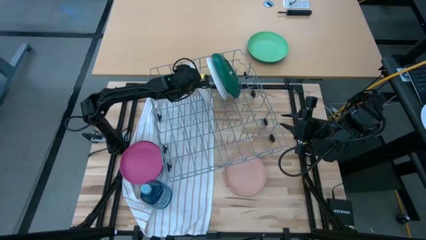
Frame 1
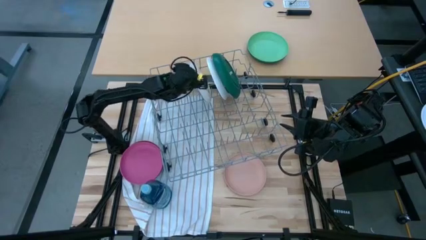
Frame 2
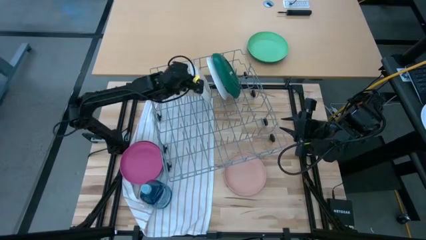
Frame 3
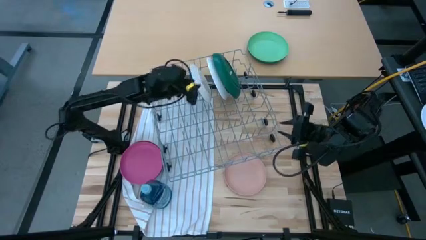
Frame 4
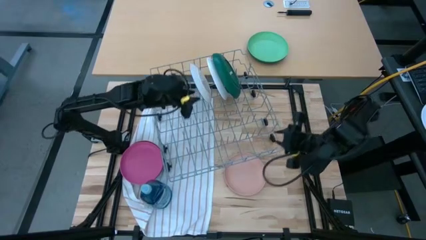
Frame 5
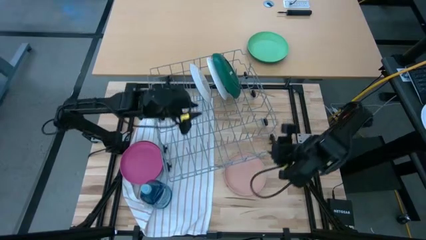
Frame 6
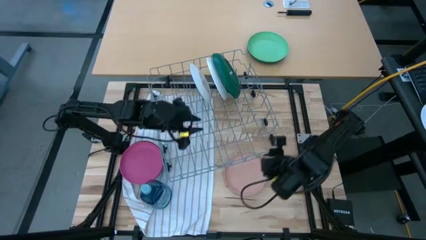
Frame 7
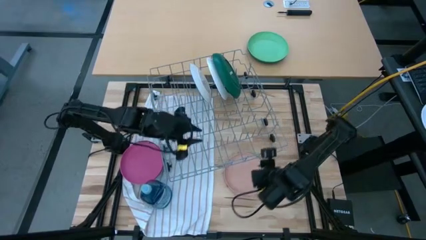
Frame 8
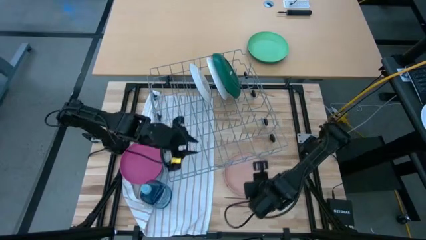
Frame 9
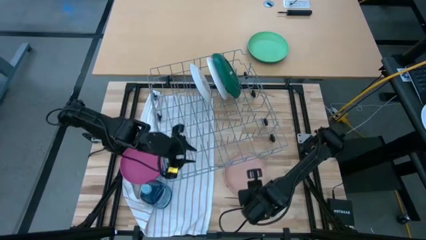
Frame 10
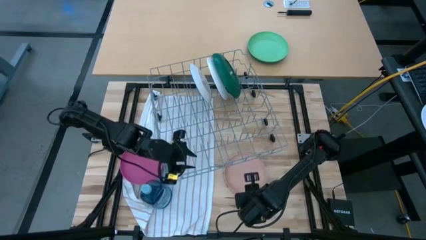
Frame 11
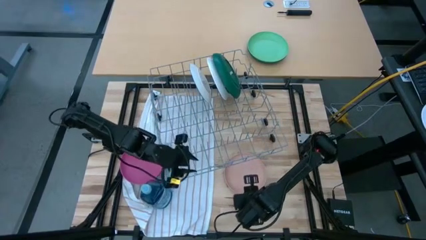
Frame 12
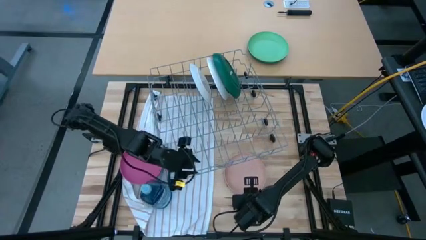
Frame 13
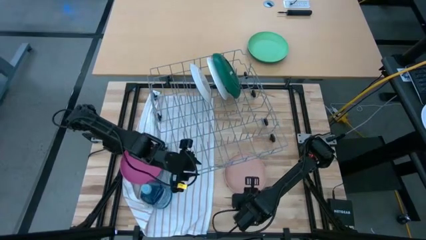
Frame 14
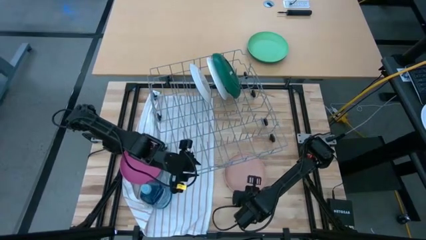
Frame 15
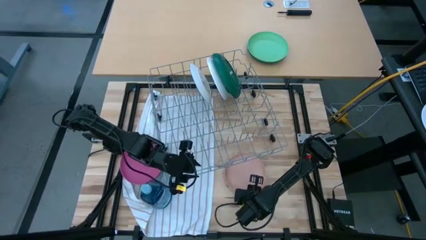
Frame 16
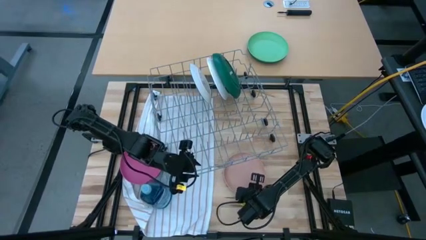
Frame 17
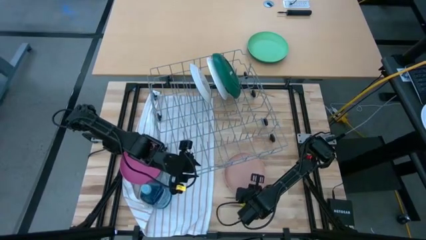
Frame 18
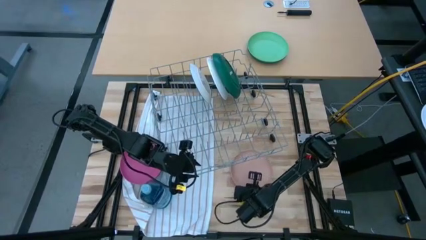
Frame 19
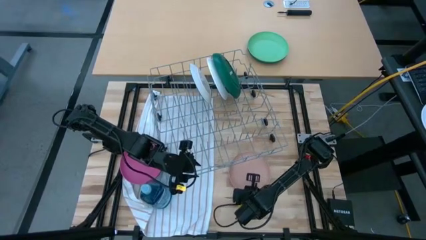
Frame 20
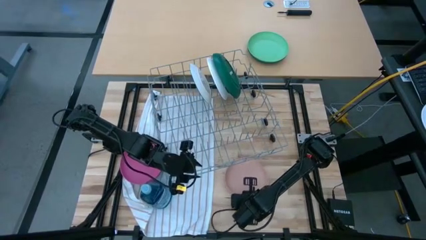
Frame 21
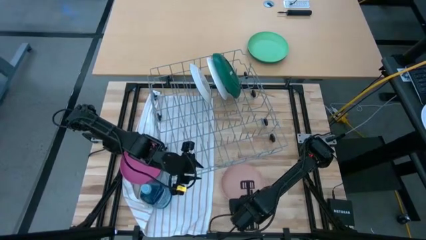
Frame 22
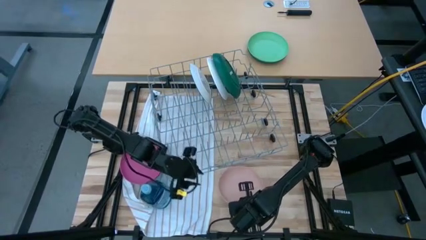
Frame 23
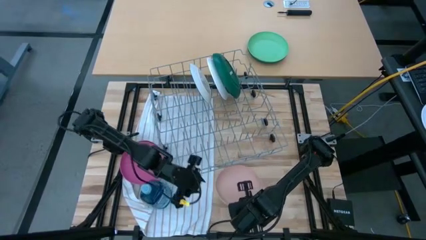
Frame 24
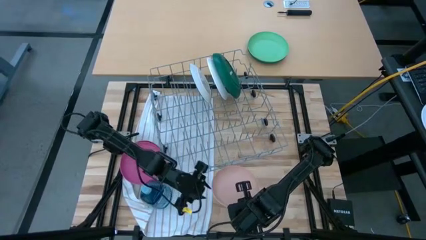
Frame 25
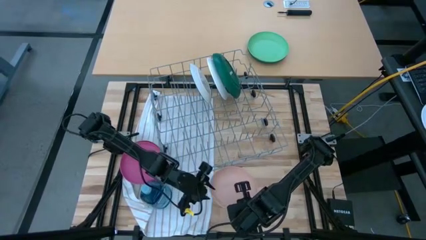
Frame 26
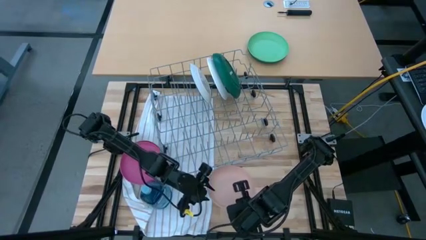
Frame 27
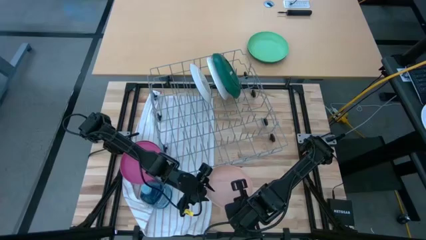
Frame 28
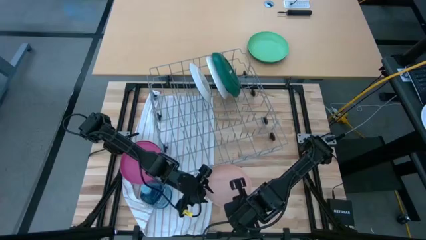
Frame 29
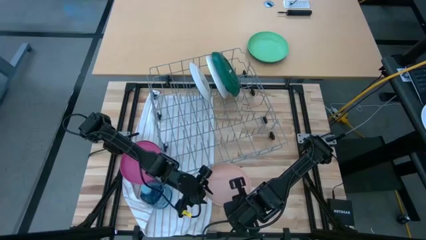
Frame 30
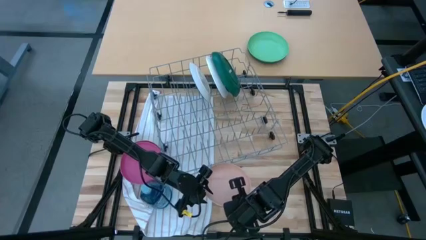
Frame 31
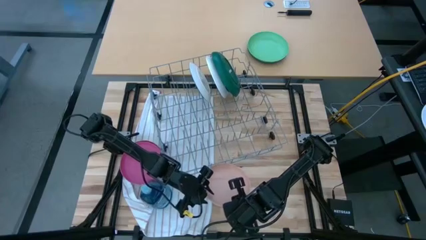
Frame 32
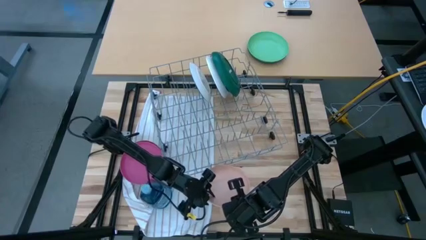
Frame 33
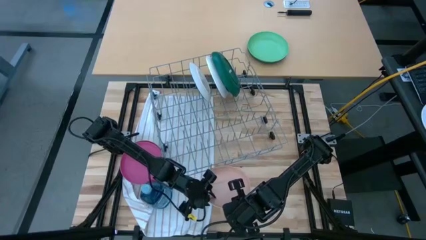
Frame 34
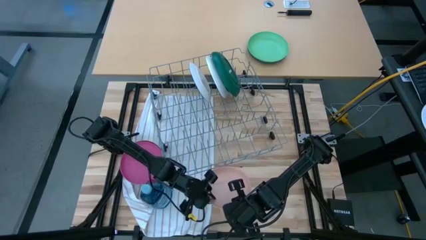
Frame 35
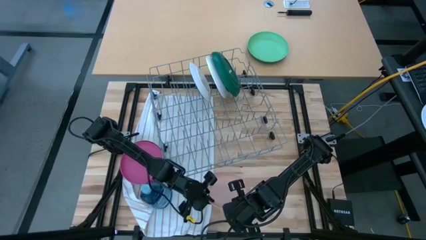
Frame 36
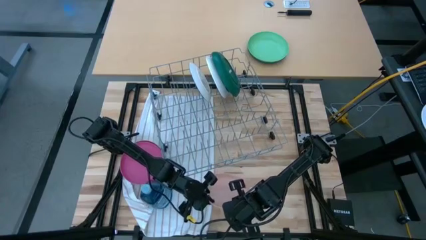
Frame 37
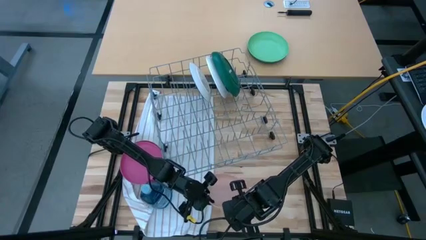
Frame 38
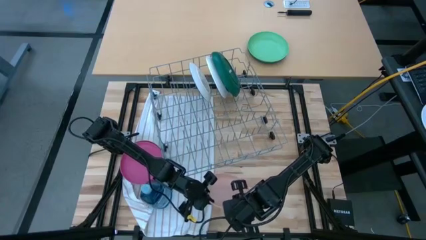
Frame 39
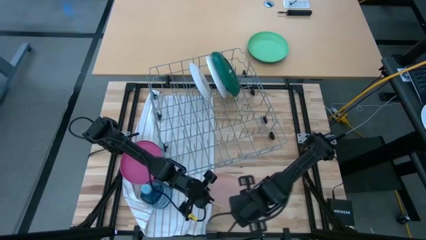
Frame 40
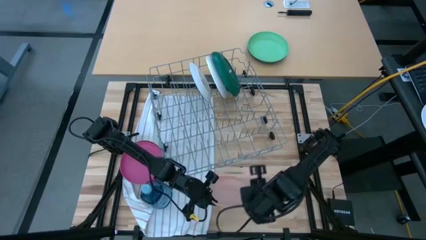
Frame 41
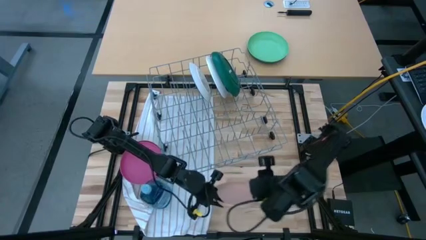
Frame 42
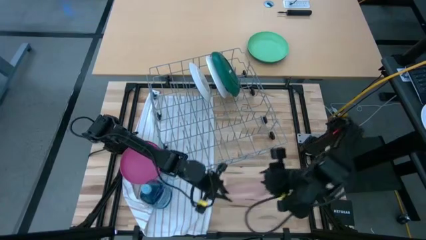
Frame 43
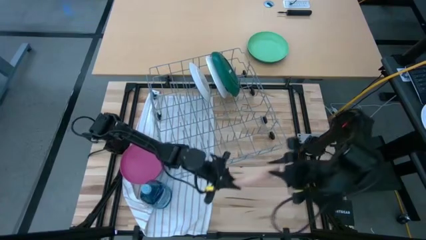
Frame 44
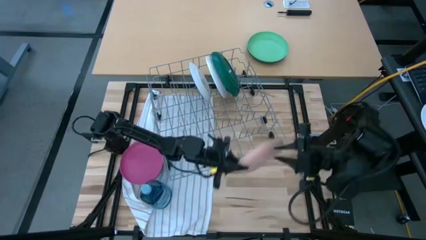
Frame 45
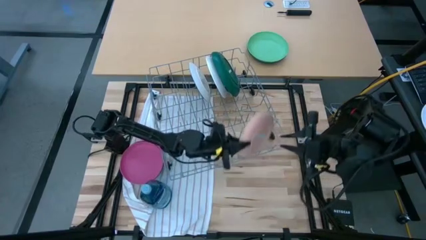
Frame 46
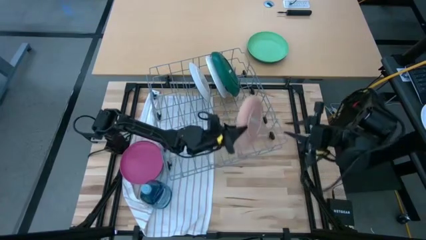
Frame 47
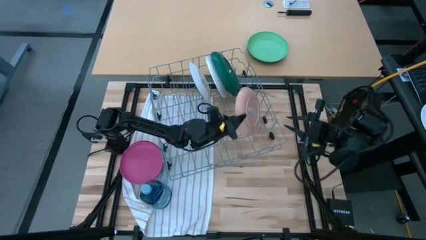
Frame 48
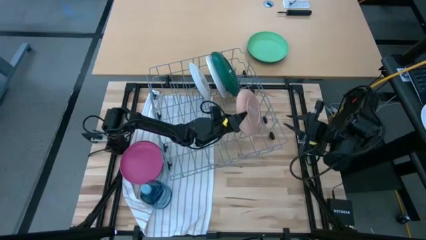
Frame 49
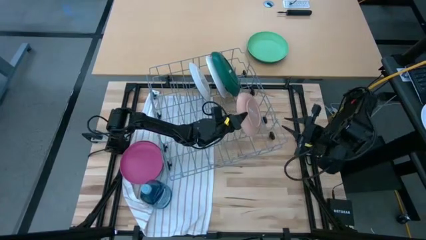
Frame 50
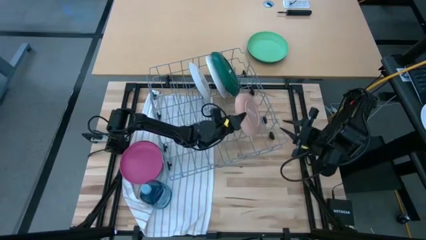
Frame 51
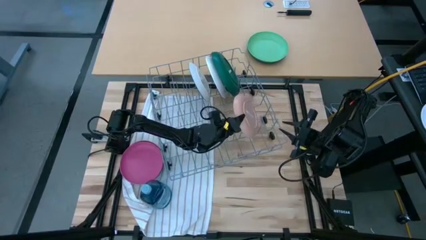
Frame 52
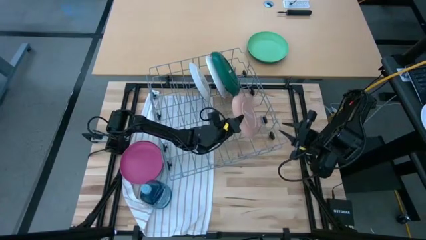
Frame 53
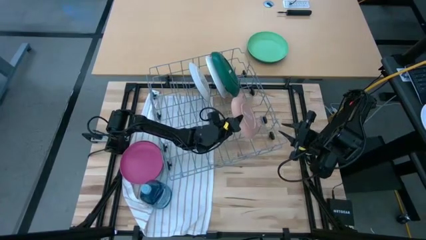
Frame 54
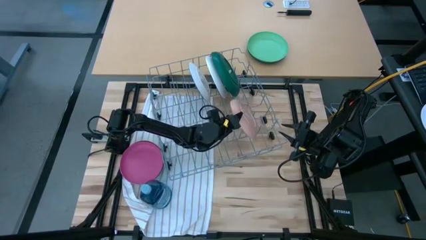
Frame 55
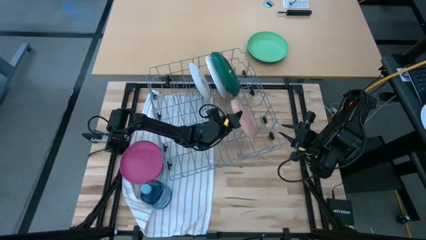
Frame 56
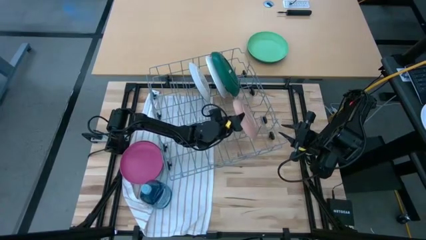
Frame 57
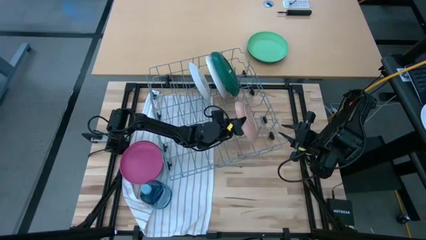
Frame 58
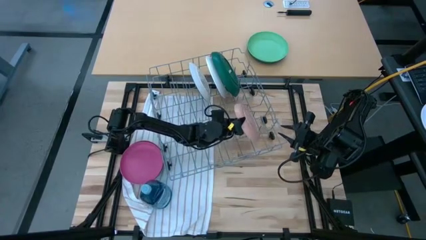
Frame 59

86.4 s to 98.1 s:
Task: Sort dishes
Put the light orange plate into the dish rack

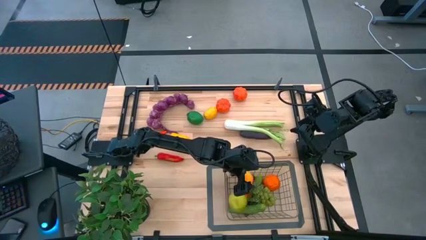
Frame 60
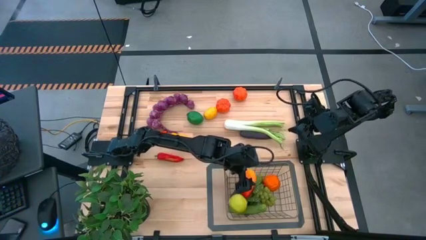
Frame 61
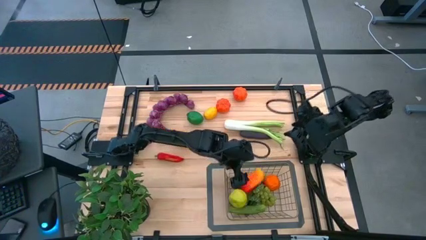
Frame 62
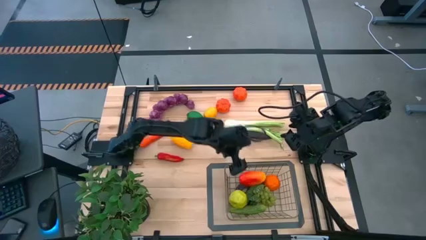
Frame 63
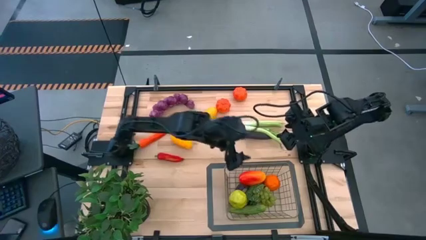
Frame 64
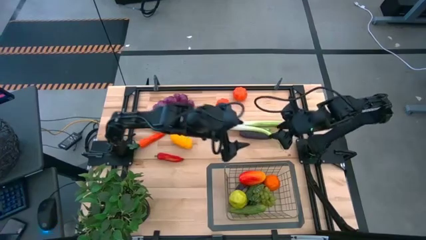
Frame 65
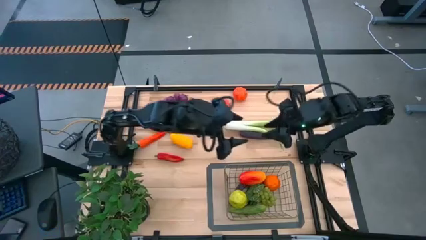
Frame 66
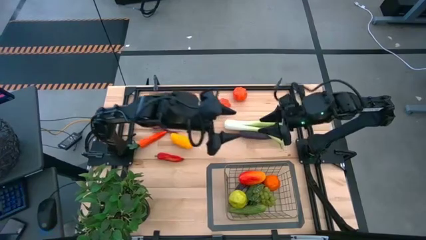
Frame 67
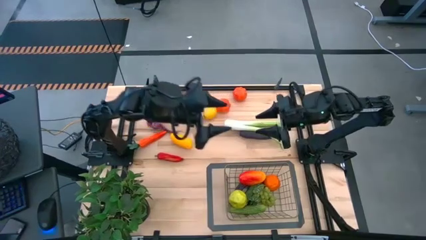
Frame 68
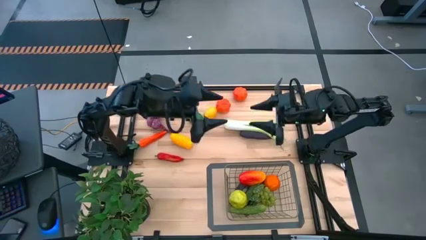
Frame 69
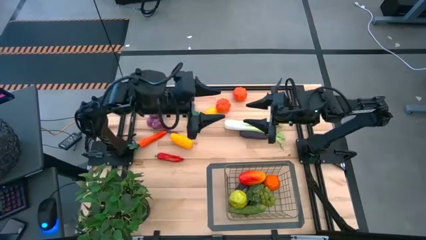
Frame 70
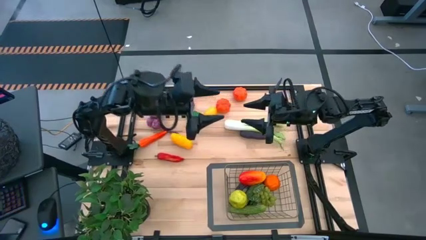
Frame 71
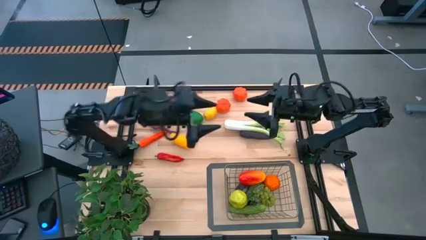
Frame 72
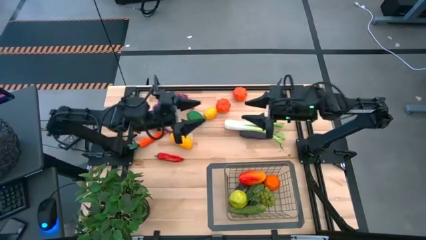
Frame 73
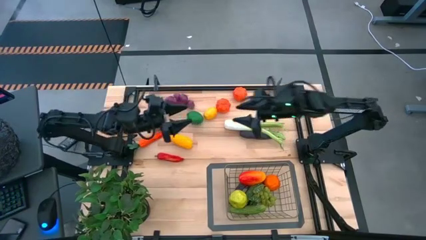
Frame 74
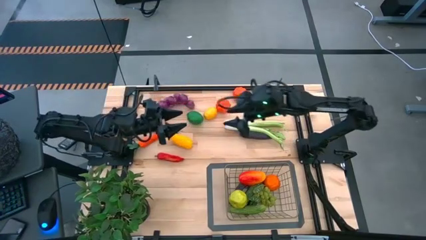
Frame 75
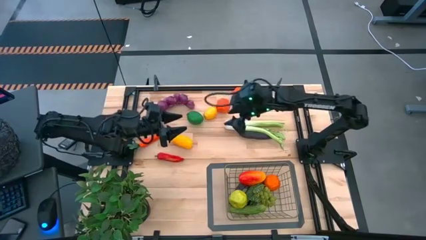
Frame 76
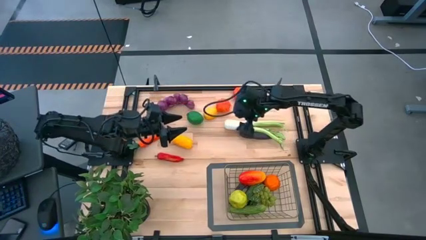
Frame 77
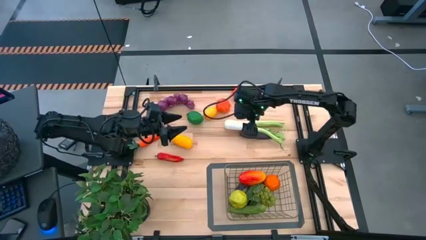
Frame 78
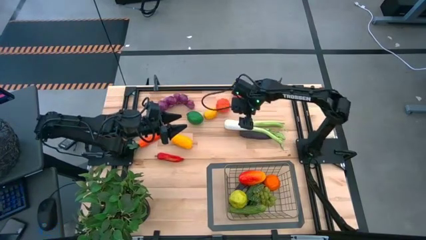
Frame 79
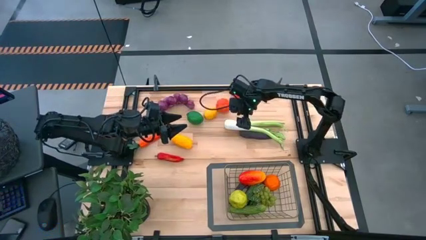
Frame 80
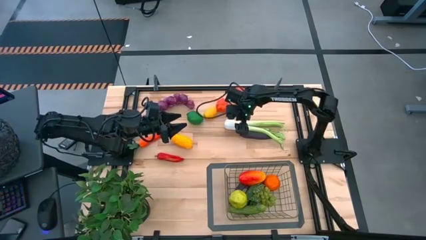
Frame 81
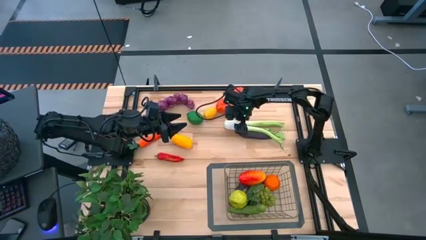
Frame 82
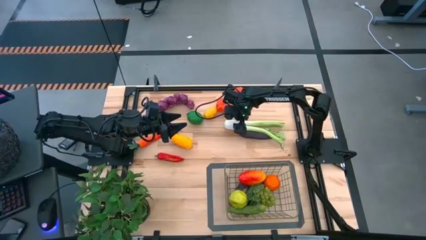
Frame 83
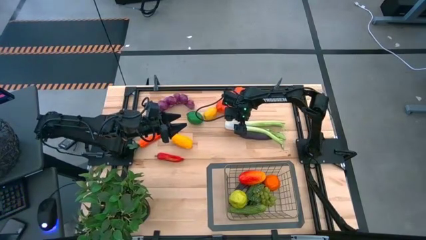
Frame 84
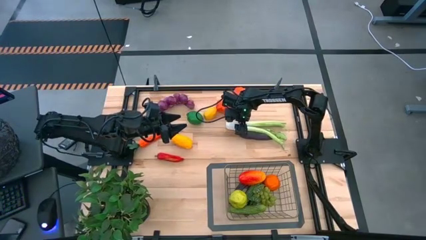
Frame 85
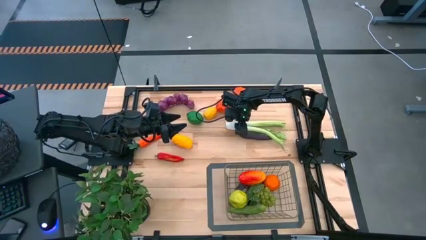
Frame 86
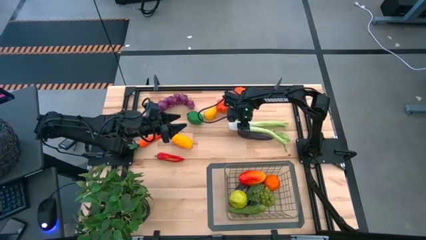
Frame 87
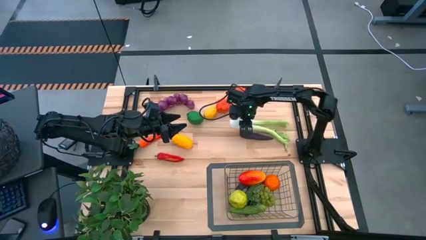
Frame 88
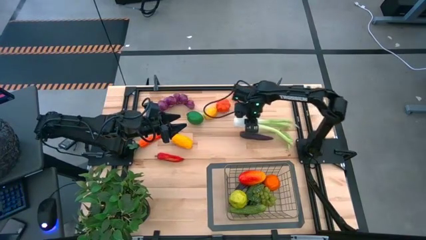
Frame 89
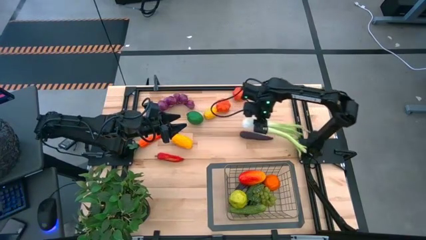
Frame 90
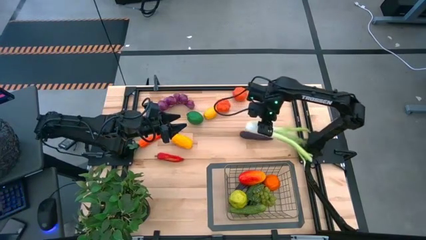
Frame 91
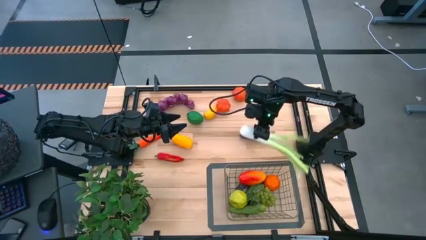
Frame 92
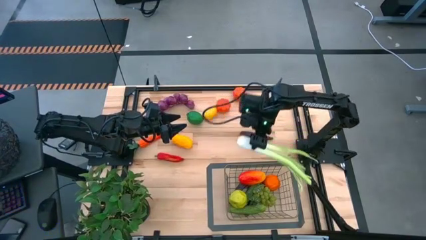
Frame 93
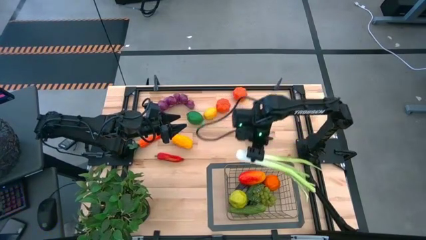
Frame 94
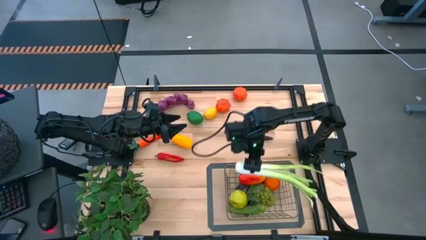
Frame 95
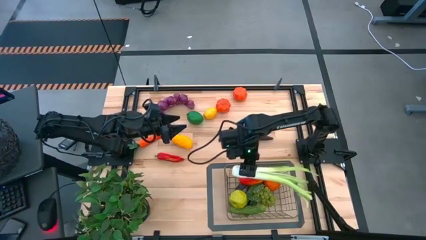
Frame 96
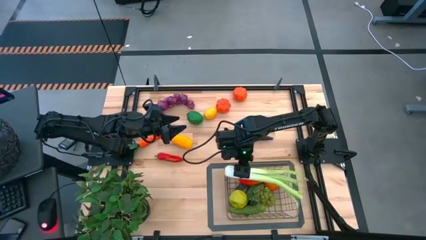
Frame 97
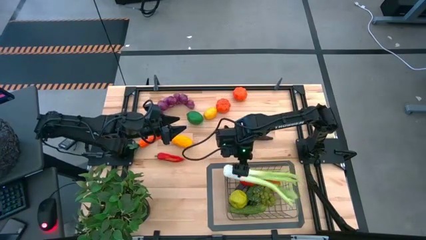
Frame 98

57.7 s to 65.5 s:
Task: Build produce basket
Put the celery into the wire basket
